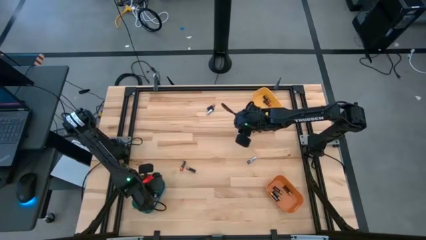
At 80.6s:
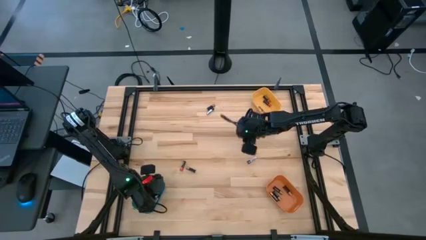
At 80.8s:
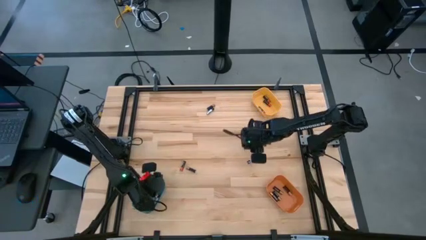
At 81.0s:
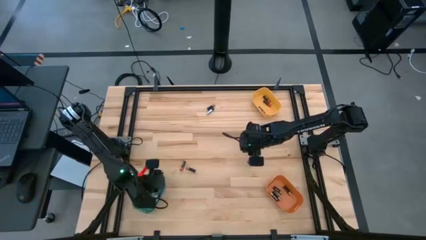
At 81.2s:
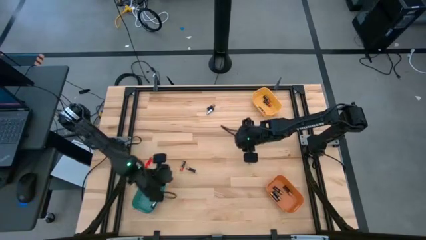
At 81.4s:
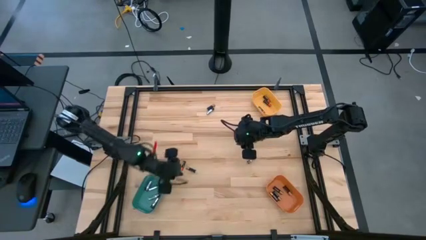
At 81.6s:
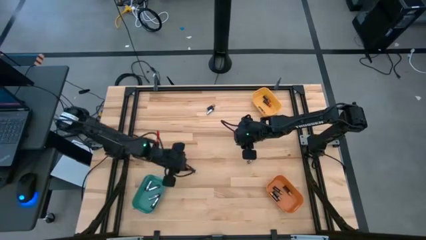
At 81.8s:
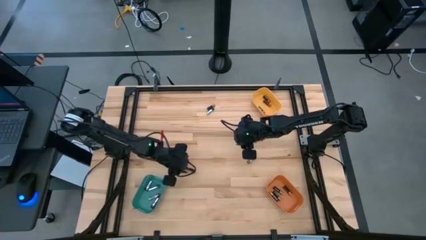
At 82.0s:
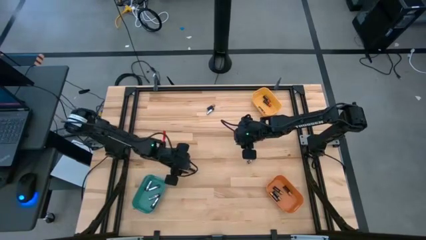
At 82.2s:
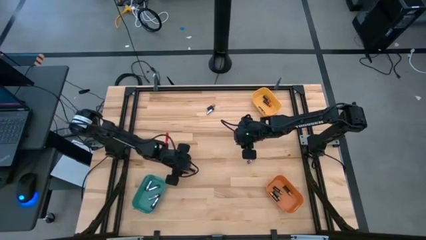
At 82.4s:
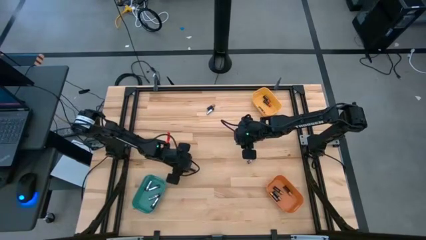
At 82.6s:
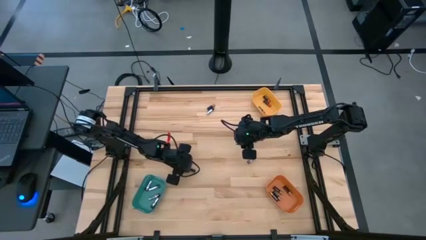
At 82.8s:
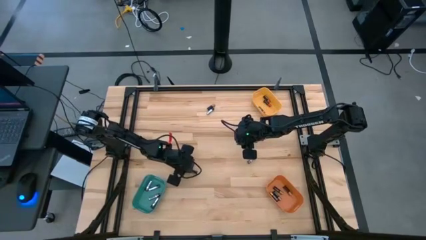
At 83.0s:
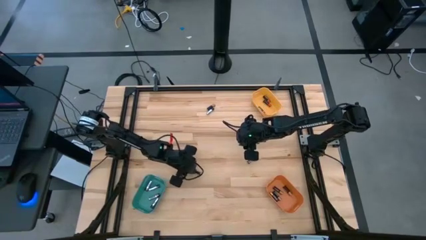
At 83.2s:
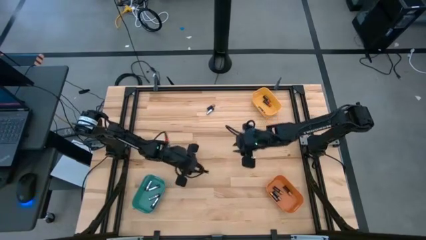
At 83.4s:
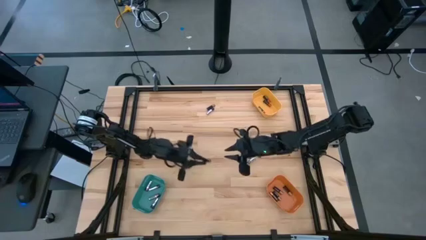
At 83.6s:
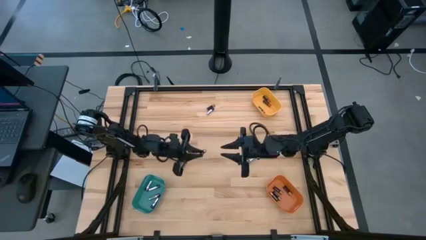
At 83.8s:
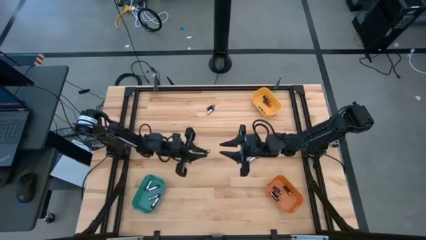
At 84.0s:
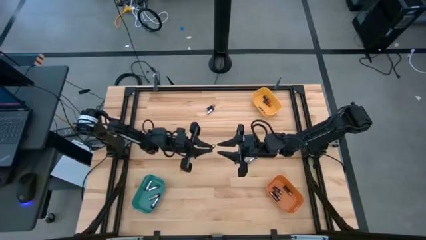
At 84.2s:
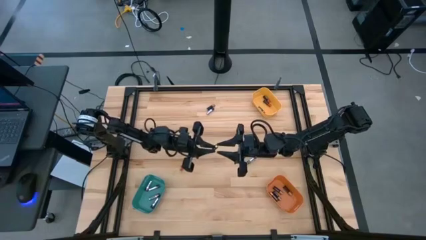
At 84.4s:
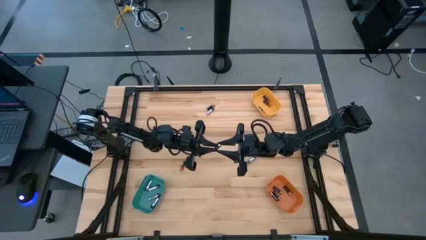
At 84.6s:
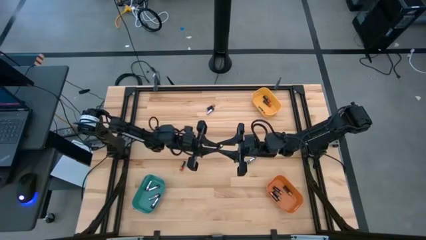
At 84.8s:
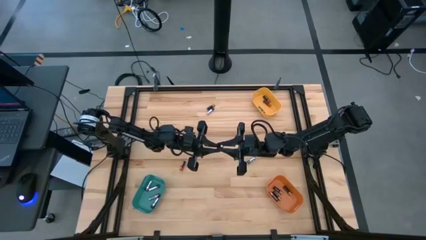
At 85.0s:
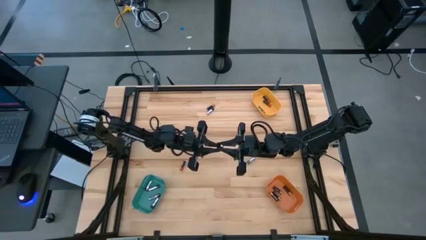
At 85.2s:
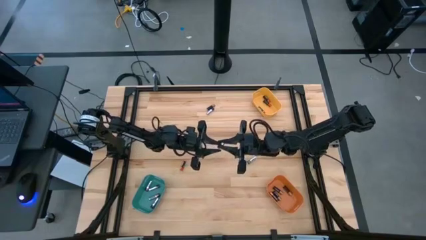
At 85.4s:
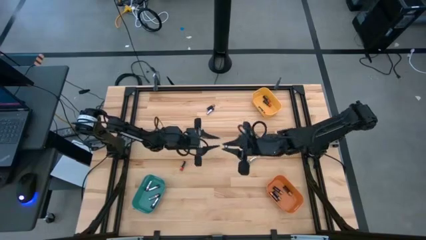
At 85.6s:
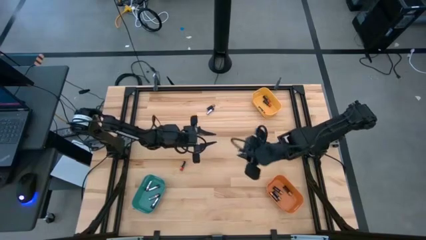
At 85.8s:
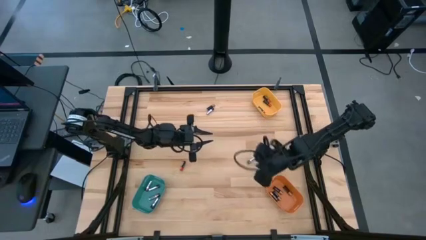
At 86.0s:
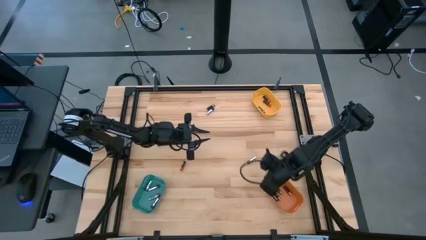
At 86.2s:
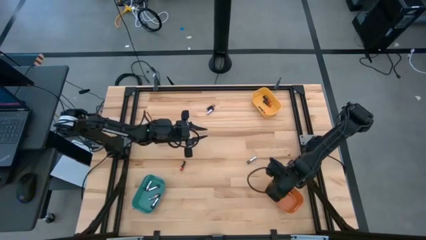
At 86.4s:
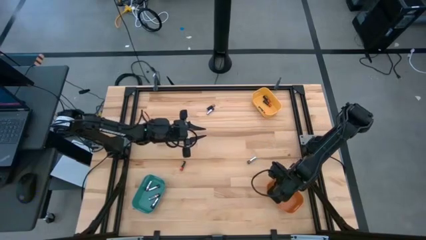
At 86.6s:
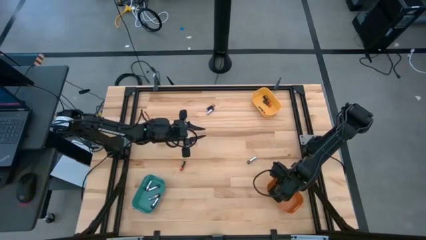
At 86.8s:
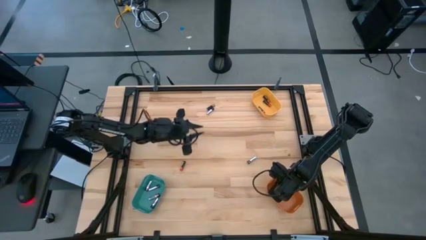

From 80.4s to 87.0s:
Task: Sort batteries
Put the brown battery into the orange bin

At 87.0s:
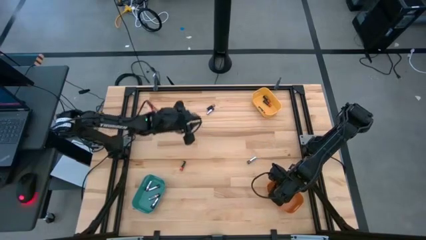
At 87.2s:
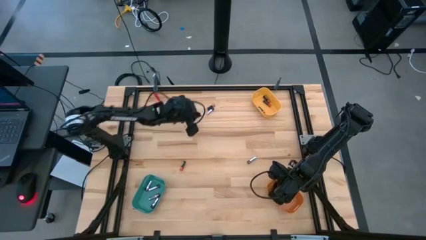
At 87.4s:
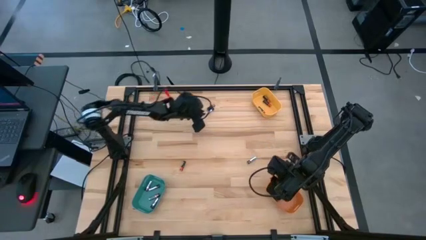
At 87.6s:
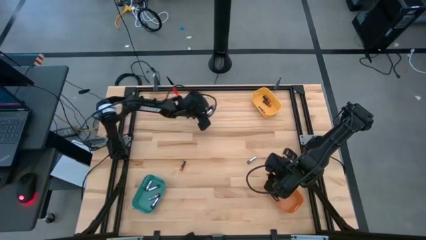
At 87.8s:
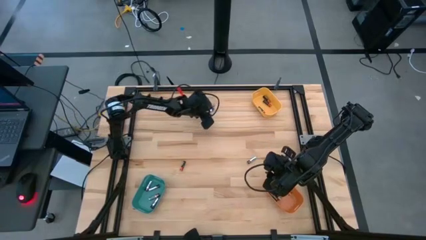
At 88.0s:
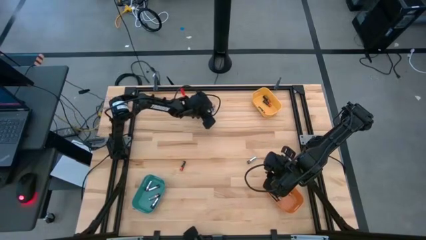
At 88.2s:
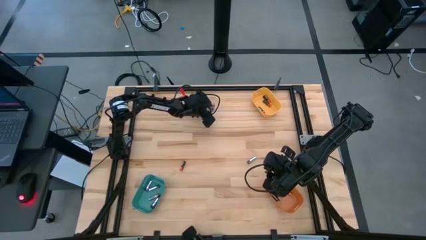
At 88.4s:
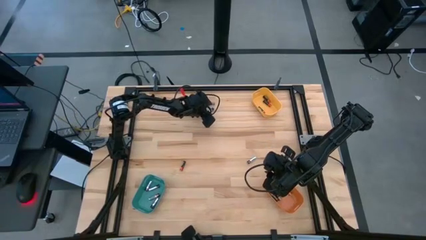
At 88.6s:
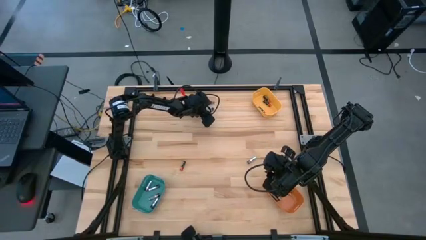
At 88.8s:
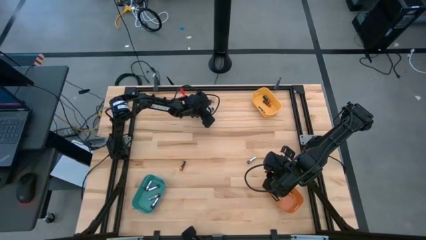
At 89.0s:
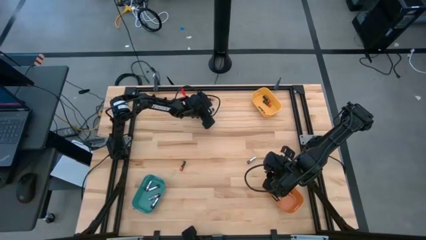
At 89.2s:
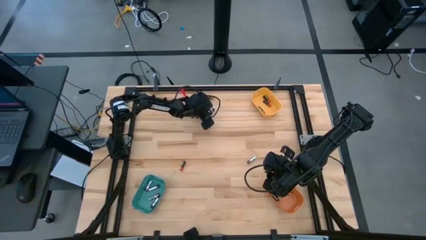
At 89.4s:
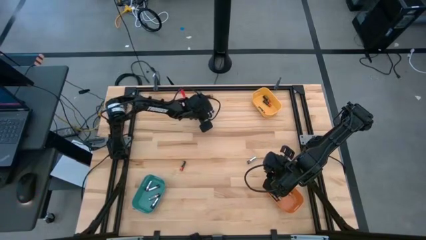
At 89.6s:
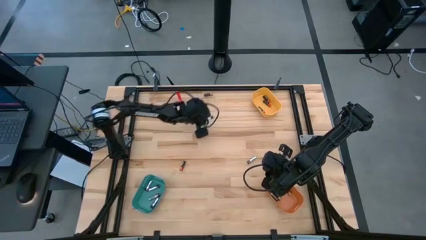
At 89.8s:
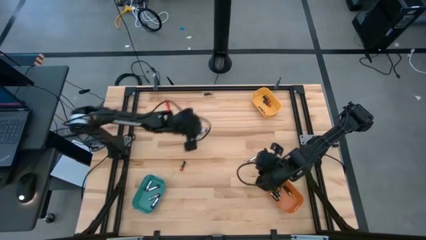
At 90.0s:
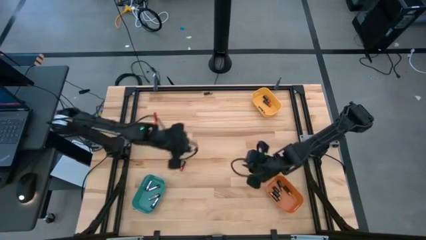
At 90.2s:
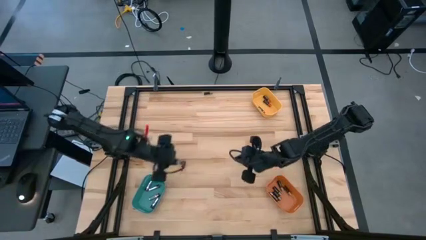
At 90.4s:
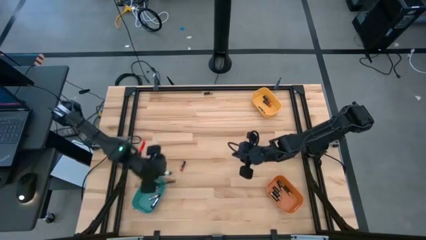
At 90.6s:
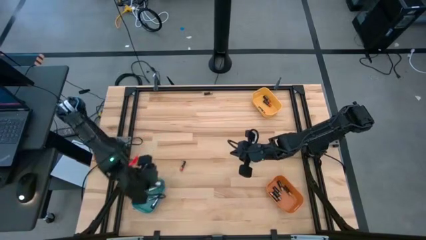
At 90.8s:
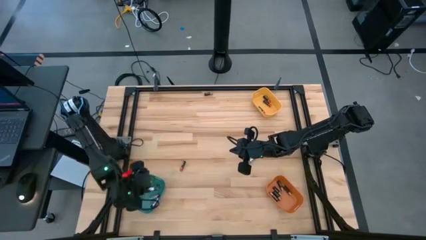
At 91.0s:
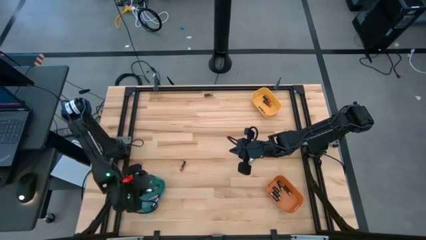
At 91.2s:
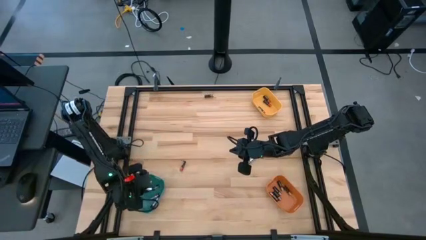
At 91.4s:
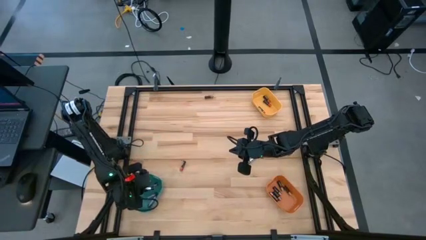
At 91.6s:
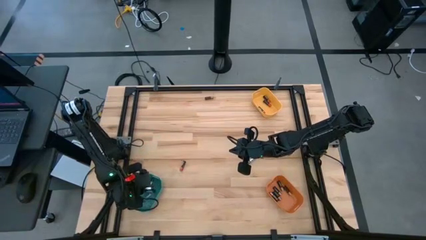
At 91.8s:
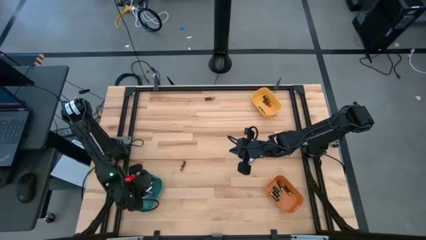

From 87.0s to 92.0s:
Put the silver battery into the green bin

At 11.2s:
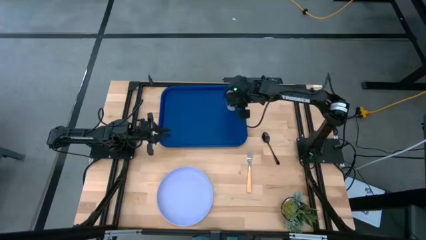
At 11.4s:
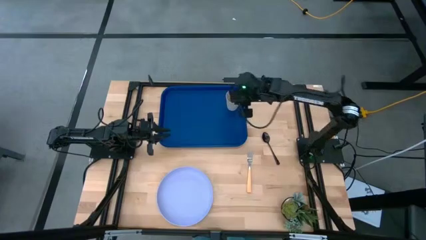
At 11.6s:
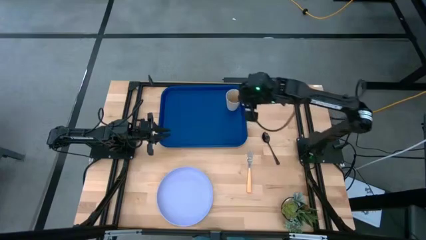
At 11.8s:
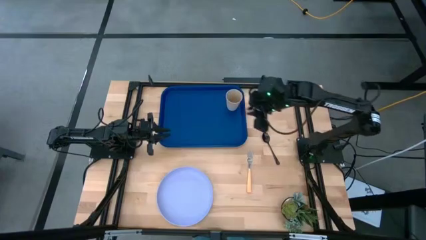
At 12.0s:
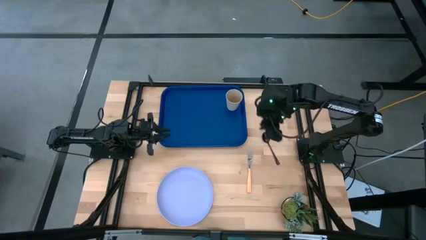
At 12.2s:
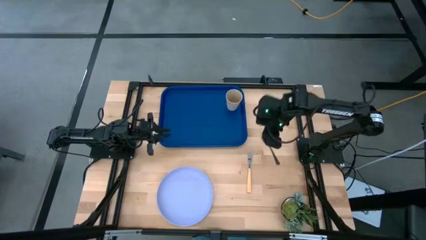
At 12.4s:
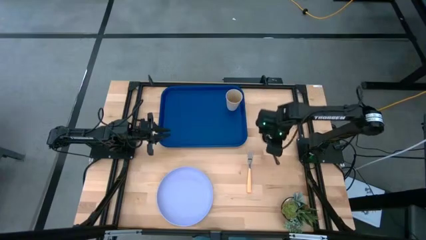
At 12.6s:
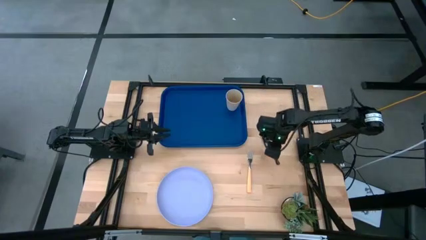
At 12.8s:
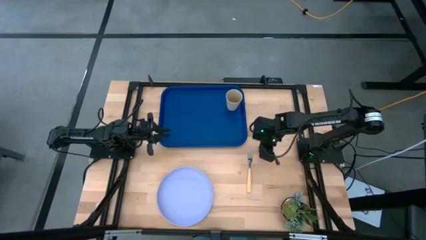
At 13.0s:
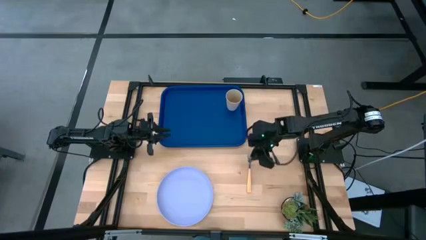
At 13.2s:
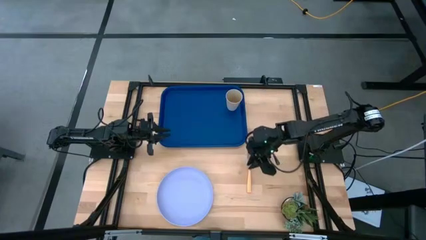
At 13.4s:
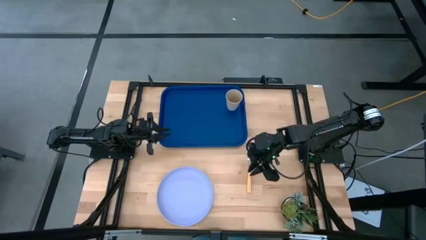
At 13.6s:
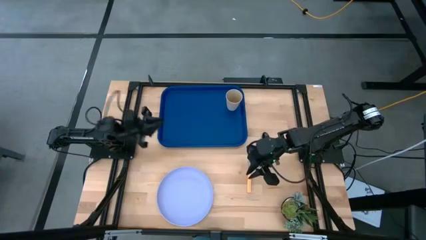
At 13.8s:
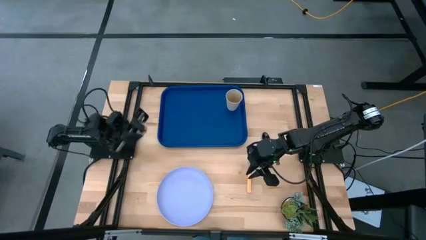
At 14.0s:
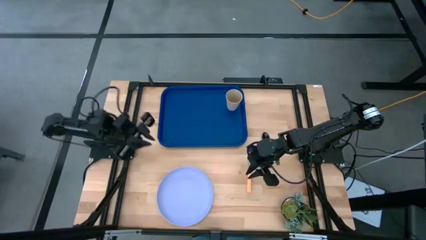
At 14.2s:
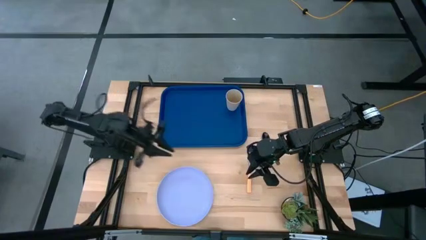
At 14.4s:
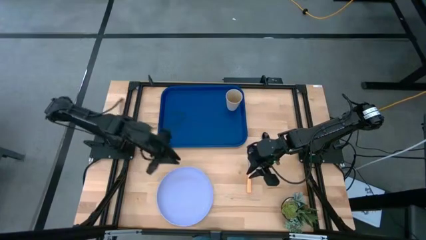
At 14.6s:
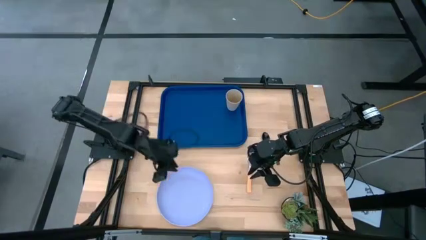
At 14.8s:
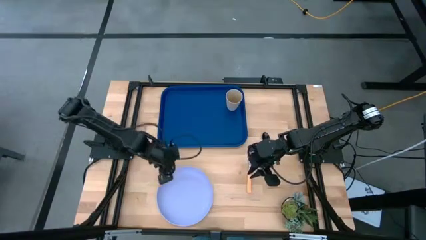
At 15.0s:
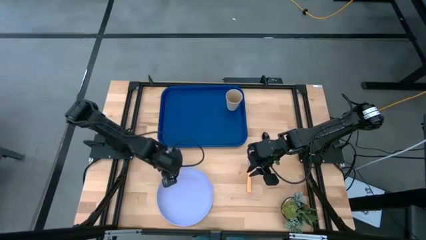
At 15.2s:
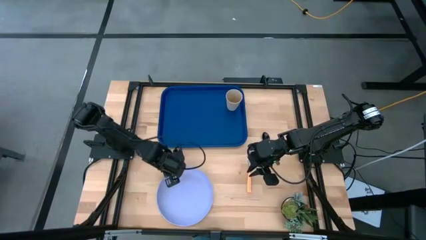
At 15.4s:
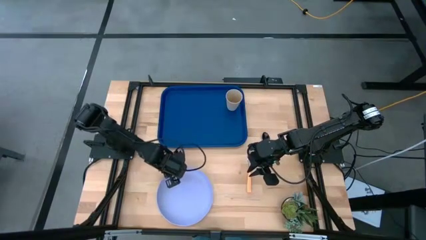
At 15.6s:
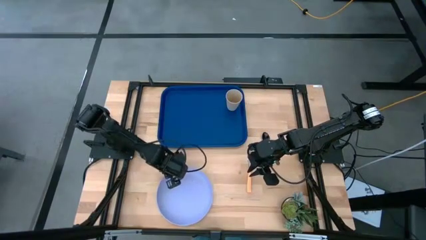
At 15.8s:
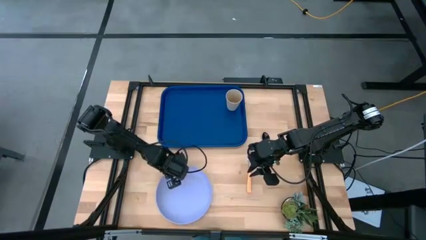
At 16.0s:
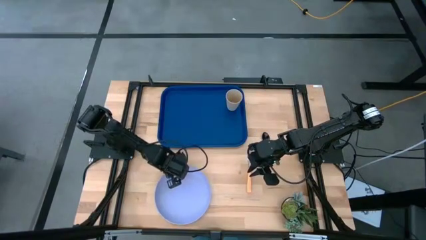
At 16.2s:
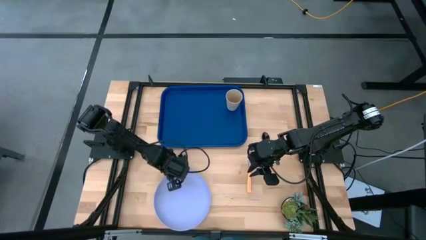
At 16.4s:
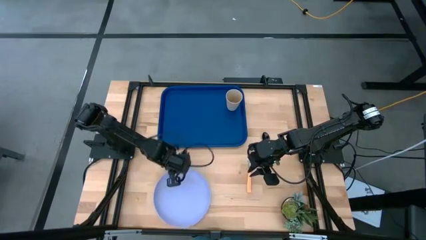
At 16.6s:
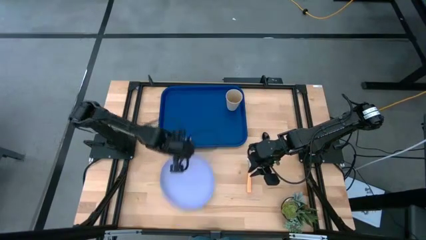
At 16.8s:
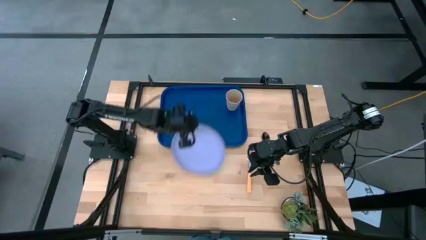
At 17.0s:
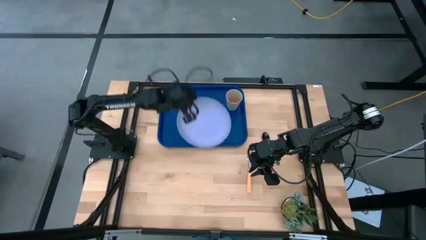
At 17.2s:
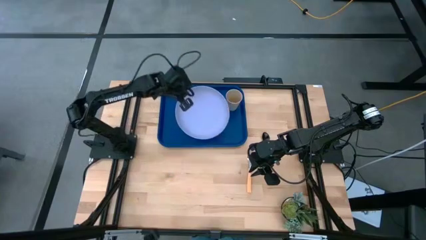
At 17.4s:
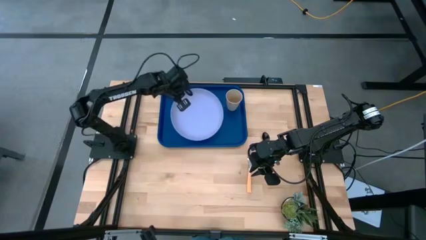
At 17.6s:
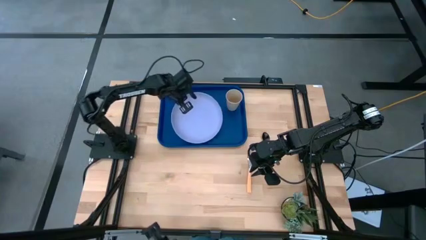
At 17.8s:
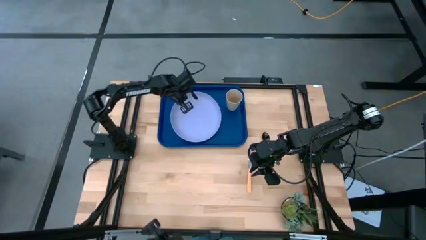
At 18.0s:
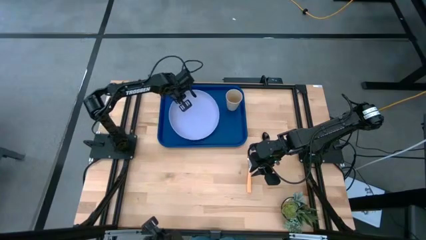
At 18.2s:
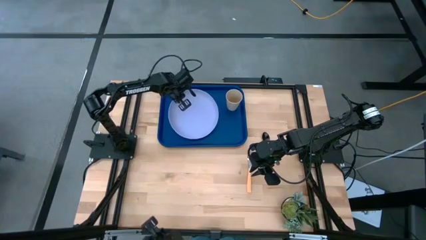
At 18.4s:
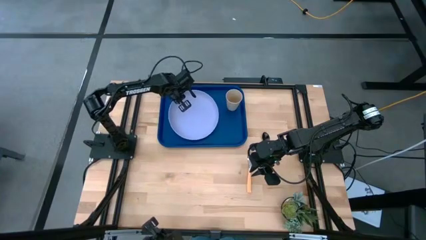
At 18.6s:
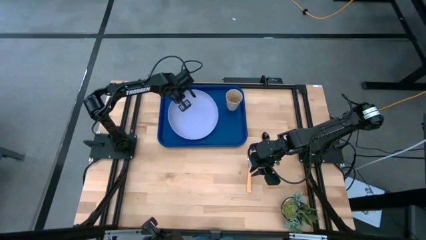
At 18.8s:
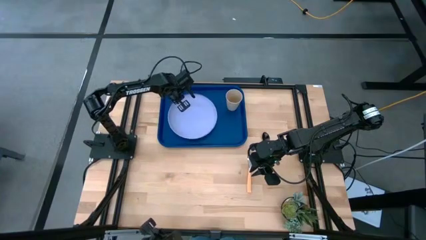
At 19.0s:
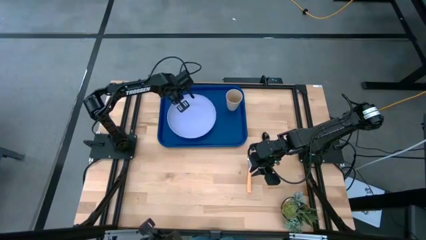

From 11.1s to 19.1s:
Task: Pick and place plate/cup/fork/spoon on tray
Put the light blue plate on the blue tray
